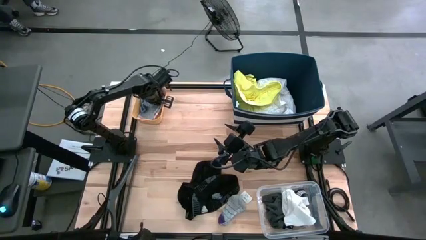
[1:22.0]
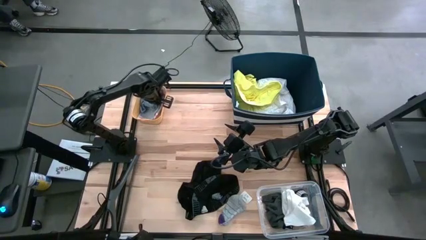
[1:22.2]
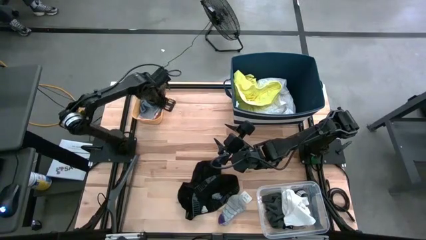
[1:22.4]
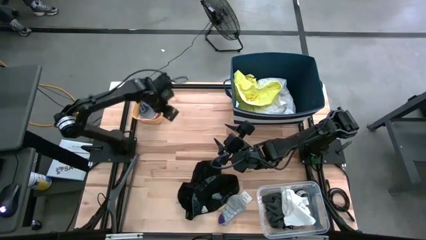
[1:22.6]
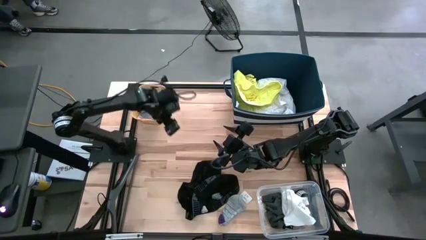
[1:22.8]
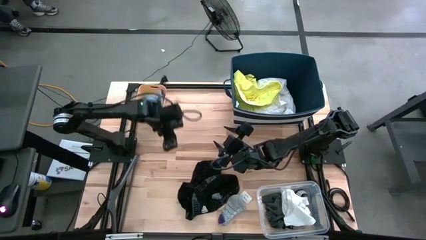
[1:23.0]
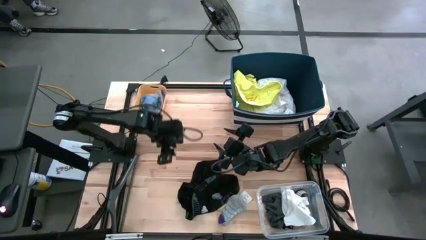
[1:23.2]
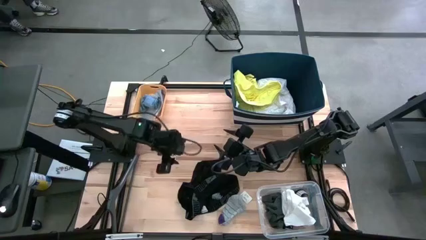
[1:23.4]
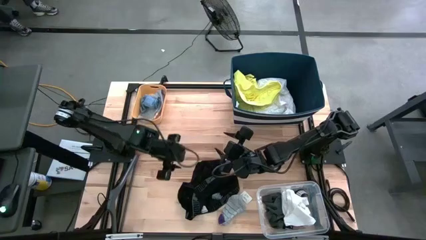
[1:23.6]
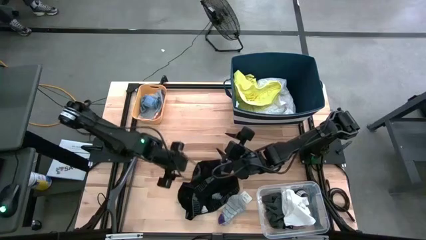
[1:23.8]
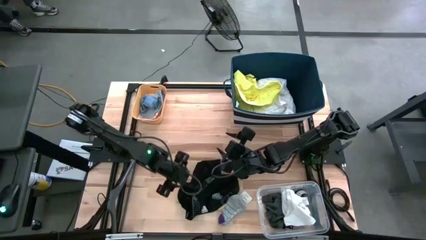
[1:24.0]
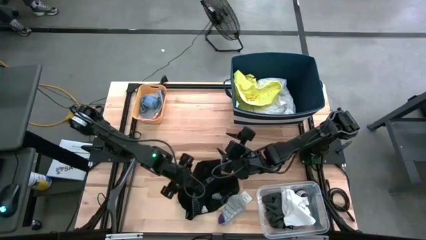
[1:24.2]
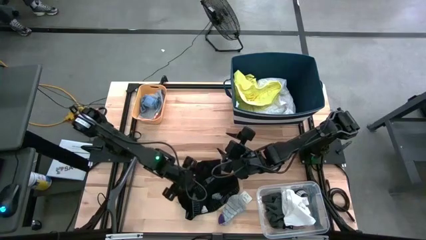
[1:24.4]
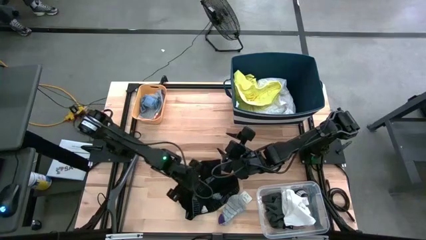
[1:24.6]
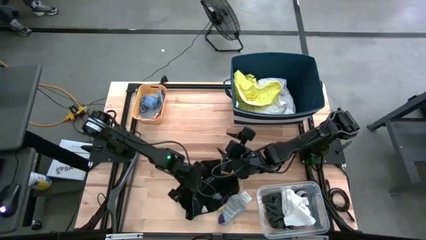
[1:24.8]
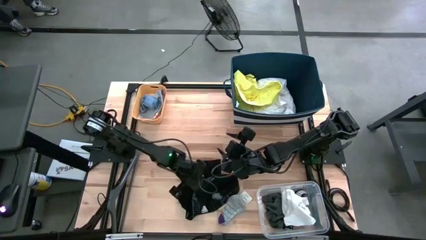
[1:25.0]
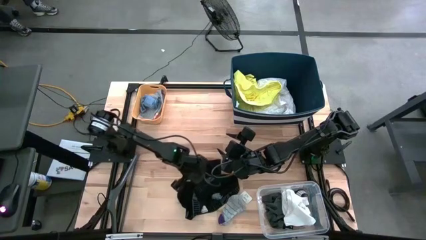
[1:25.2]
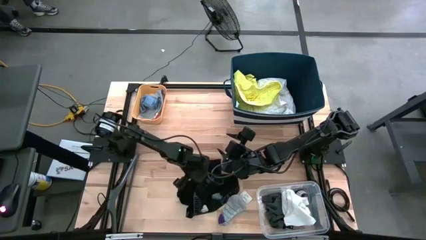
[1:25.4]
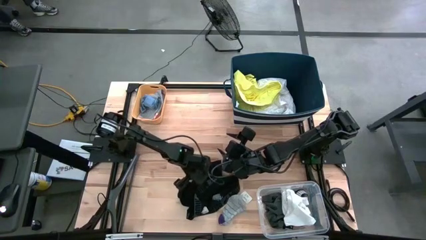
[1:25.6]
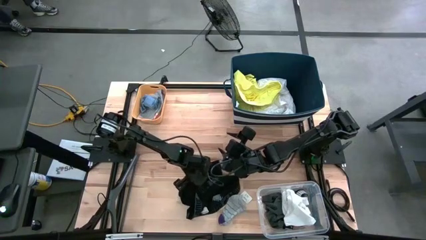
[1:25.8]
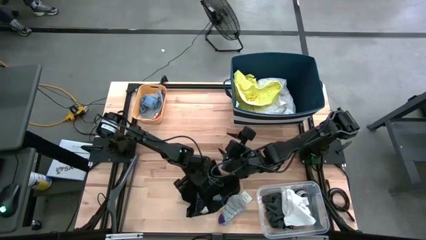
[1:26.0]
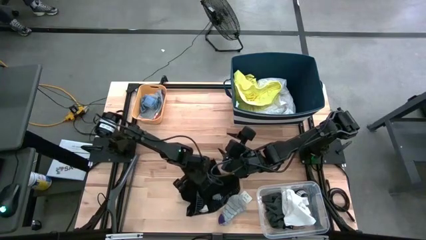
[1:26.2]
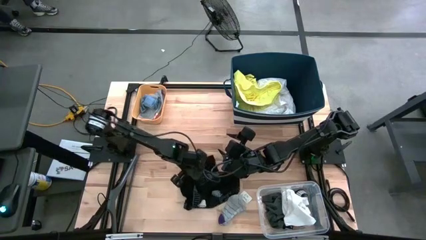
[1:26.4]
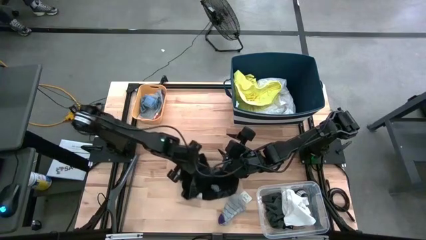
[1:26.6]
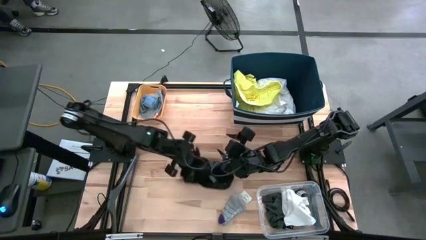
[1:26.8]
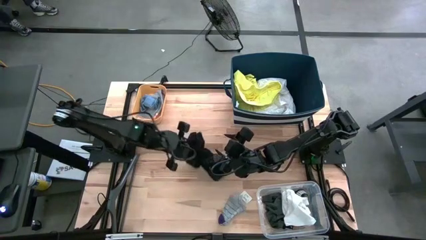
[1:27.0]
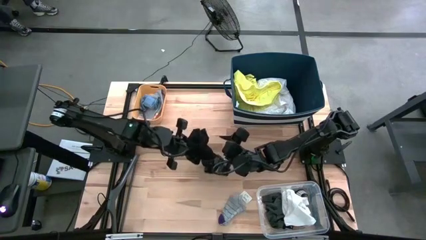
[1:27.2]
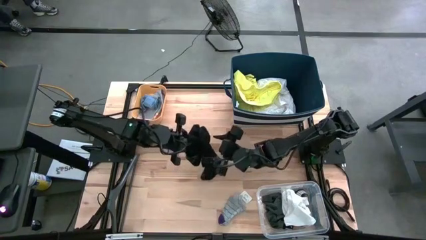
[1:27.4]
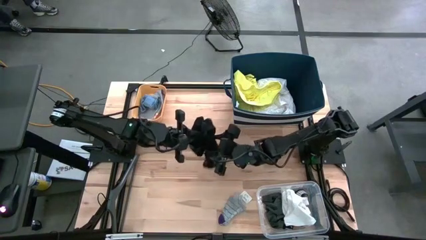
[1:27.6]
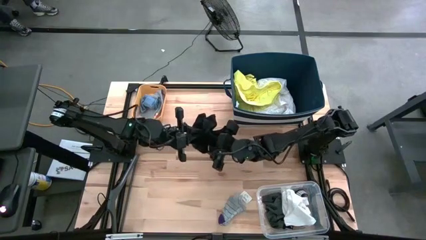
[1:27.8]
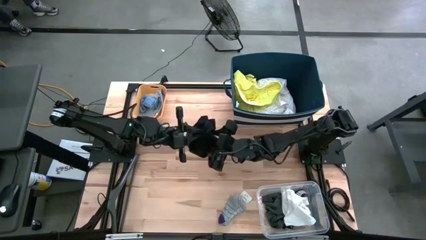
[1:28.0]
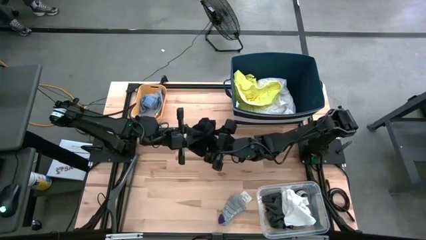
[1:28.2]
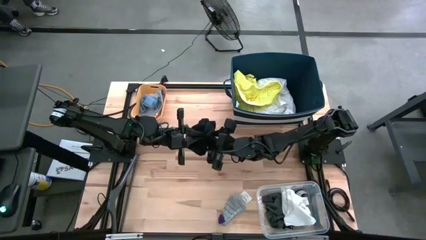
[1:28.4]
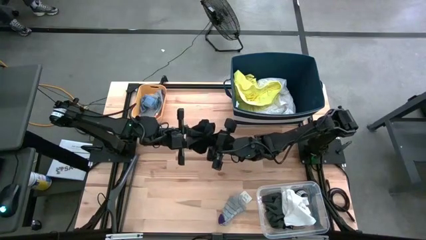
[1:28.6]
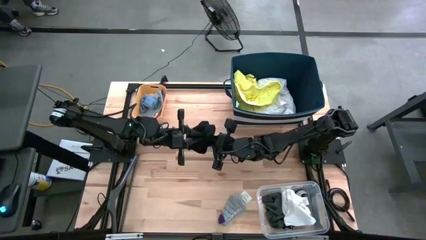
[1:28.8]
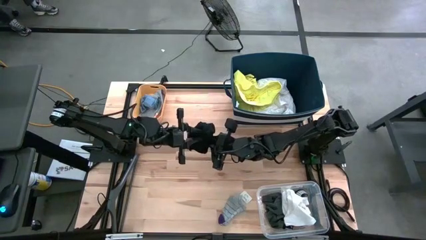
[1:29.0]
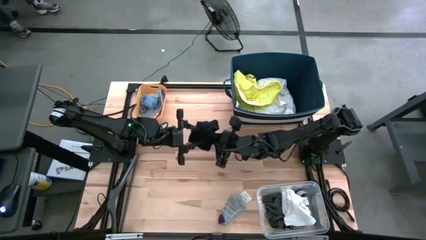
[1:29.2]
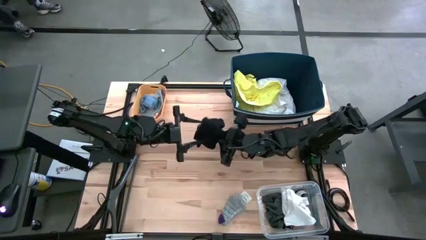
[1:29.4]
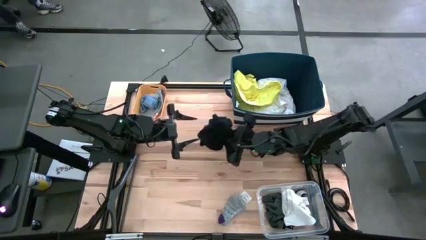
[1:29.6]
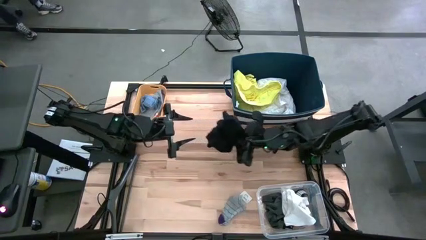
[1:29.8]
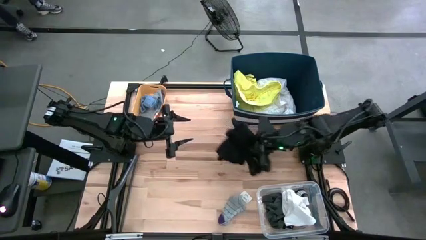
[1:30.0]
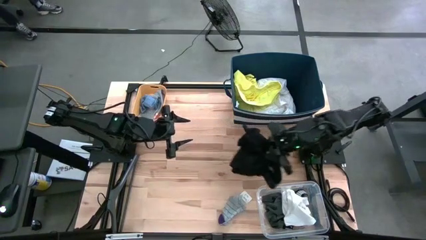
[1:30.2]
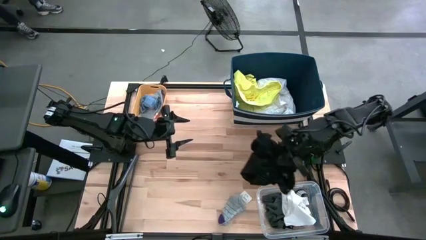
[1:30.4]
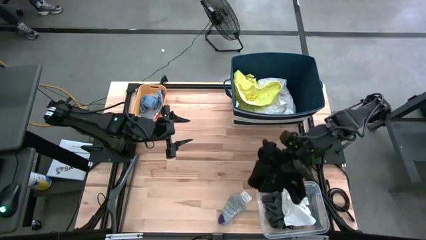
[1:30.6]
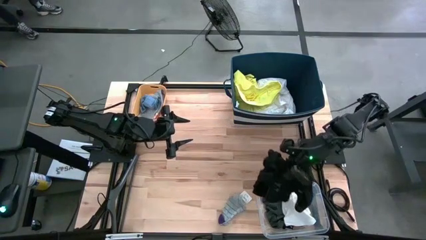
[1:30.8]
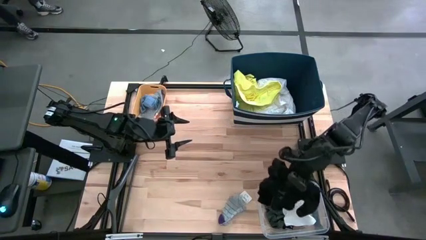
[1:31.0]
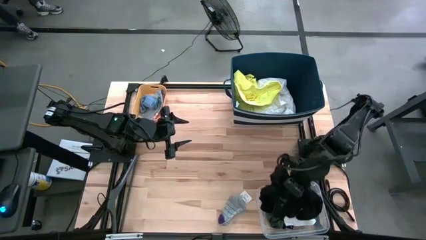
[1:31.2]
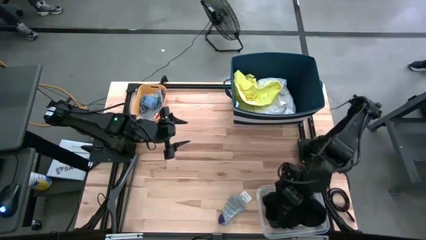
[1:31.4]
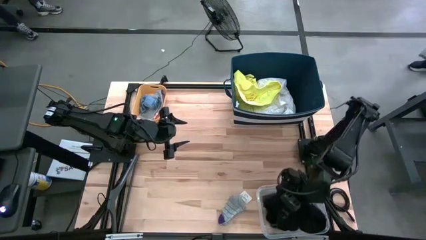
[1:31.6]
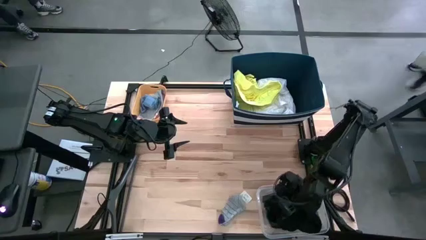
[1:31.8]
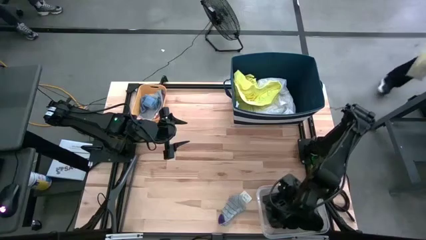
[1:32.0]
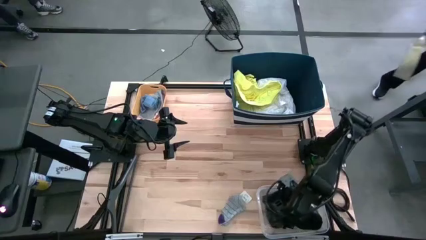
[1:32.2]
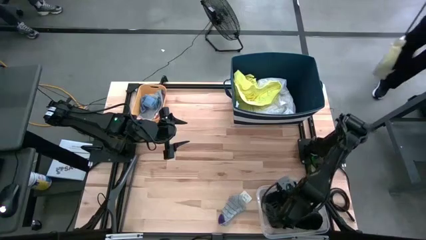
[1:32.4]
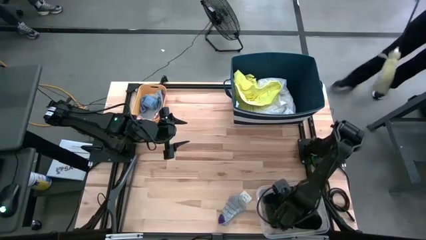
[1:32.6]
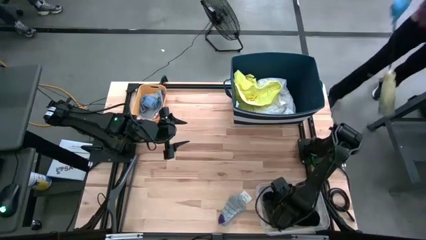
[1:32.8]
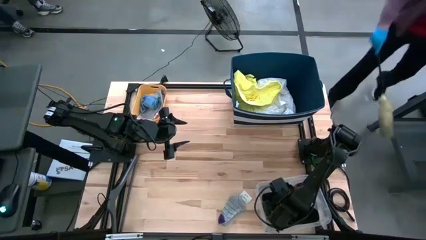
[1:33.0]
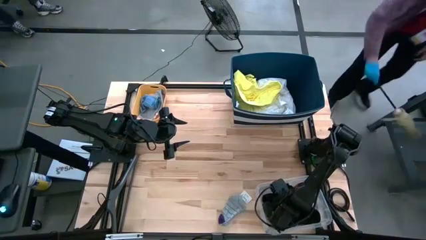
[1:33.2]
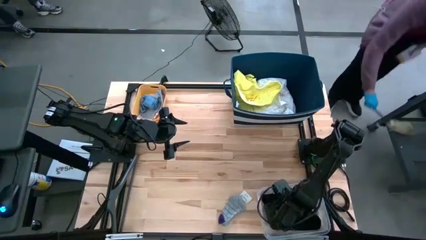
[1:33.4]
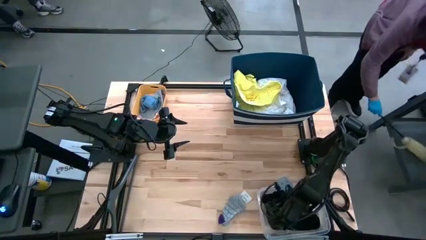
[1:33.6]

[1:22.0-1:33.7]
Task: Pick & Place Cloths
Put the black boxers into the transparent bin

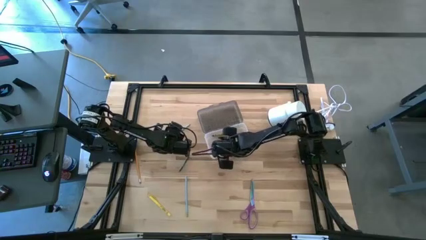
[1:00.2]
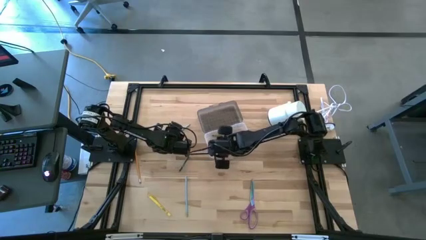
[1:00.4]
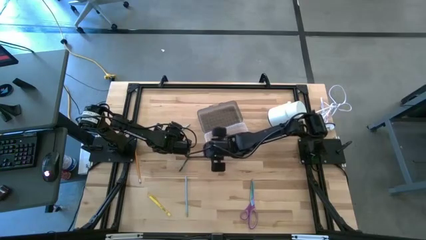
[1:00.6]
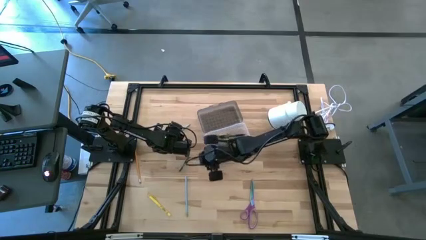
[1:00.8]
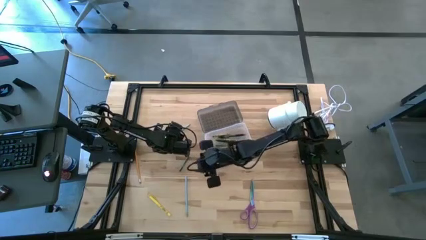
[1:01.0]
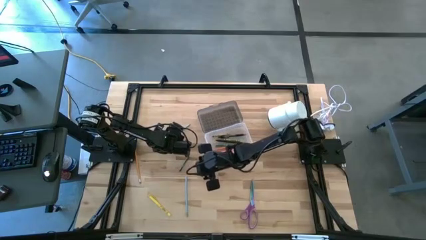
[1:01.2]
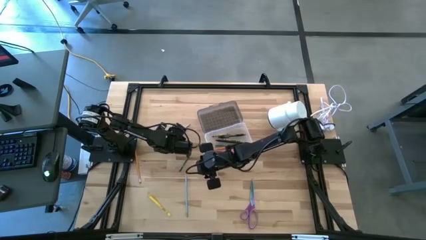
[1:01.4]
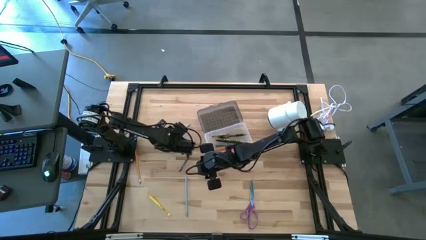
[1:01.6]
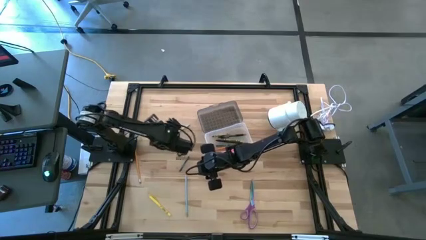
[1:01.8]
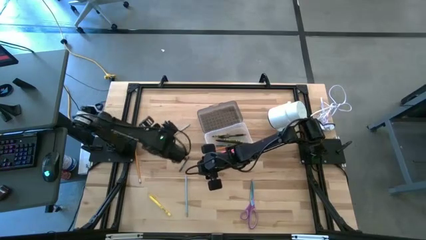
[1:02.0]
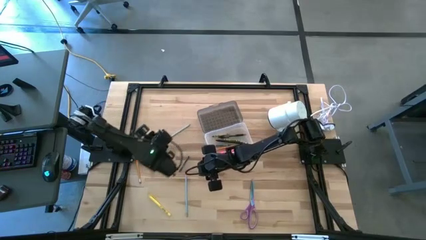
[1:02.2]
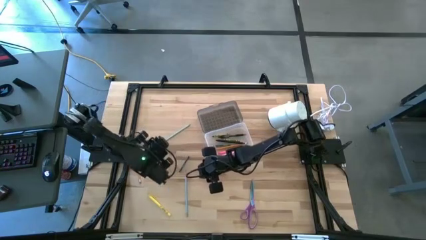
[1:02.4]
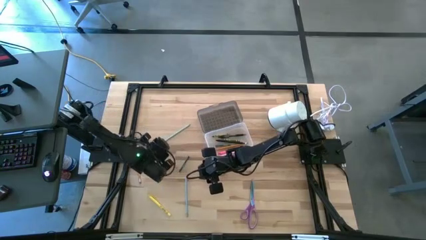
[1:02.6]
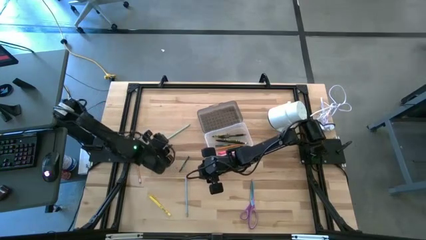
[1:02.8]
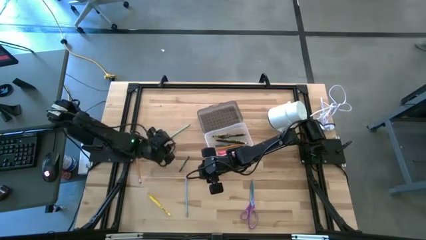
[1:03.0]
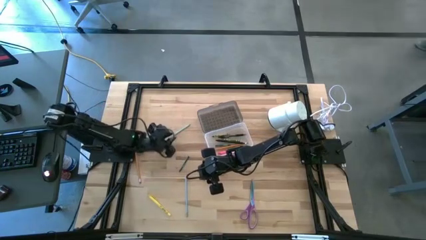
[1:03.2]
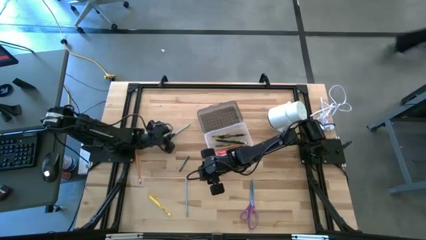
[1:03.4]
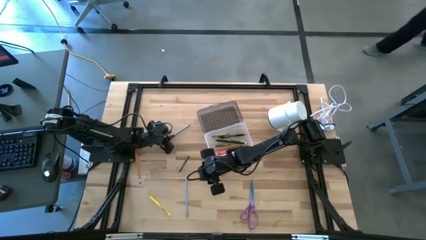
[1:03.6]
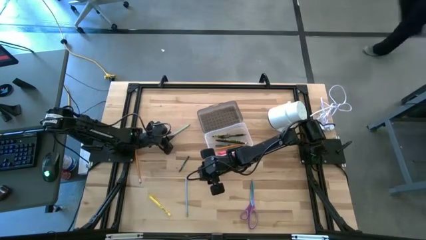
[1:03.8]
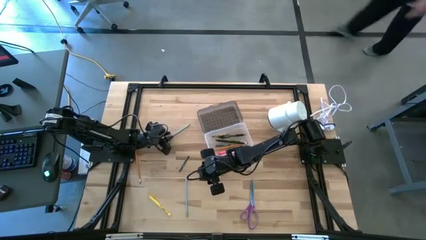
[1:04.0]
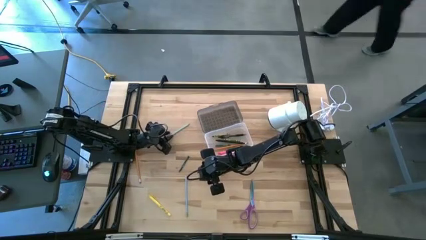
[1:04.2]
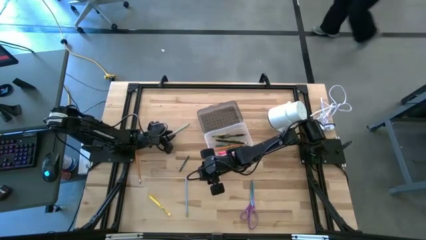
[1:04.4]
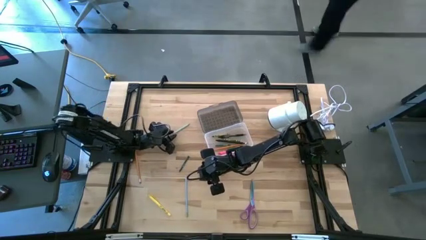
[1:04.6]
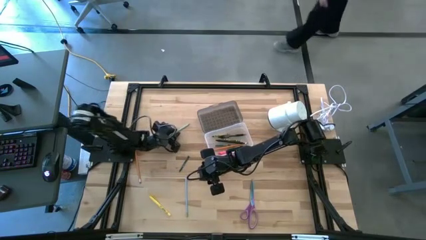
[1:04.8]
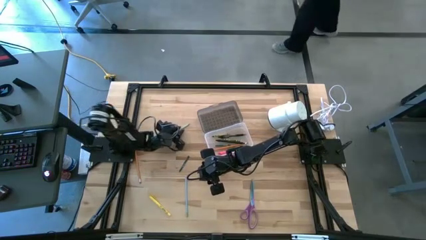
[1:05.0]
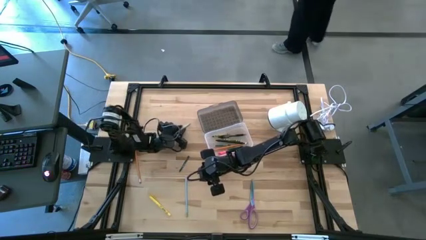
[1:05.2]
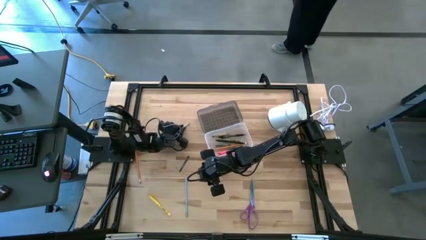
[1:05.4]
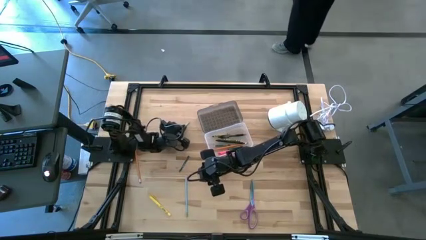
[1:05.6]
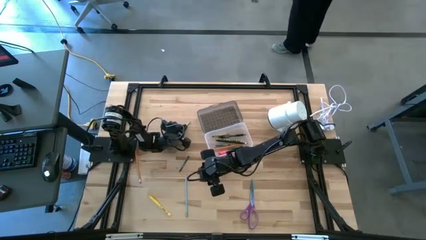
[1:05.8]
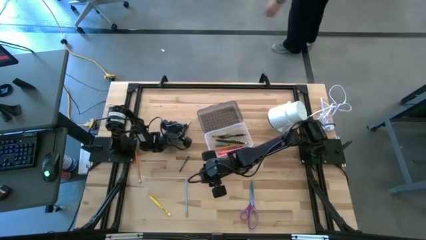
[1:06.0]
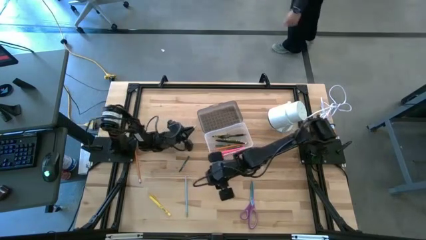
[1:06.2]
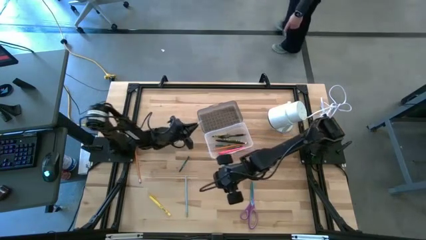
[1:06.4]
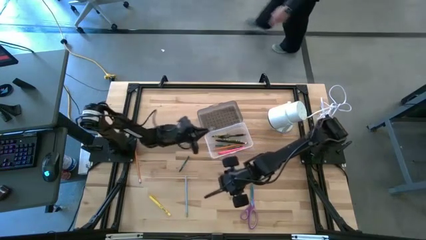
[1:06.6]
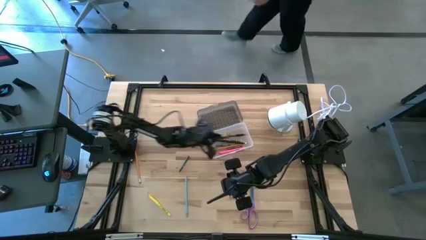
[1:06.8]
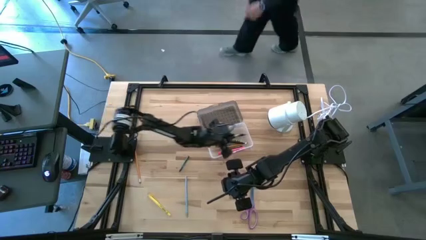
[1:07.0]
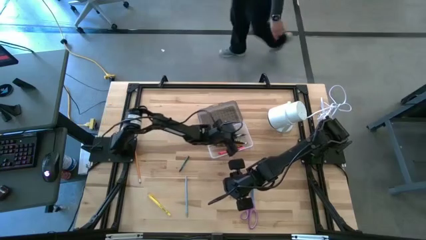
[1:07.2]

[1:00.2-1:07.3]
Task: Pick & place school supplies into a supply box
Put the light blue pencil into the gray supply box
